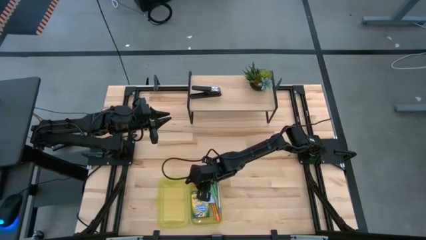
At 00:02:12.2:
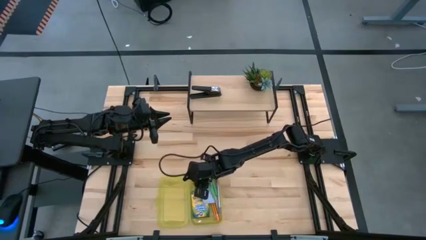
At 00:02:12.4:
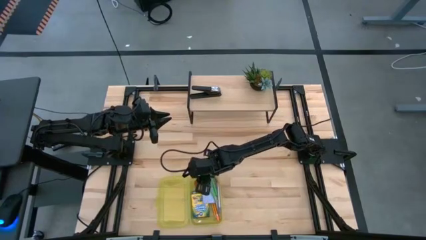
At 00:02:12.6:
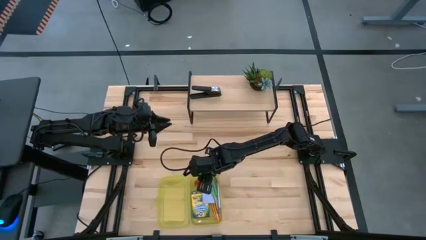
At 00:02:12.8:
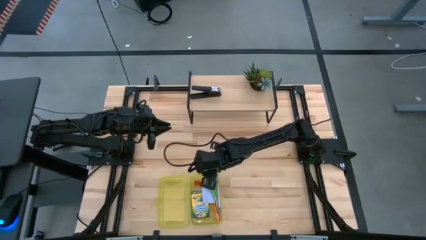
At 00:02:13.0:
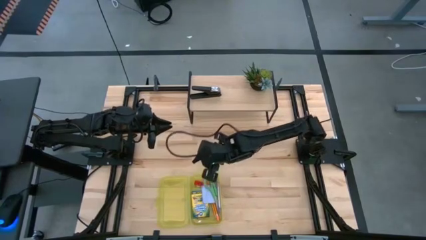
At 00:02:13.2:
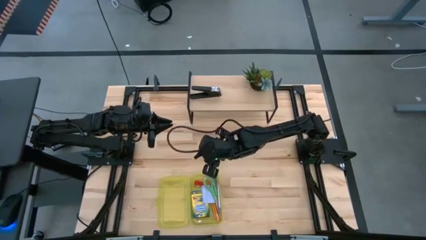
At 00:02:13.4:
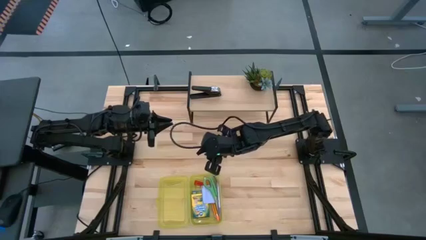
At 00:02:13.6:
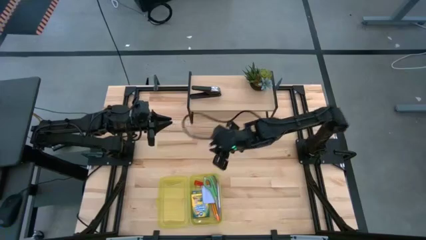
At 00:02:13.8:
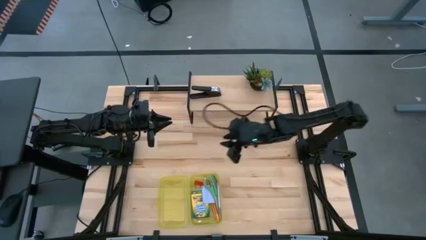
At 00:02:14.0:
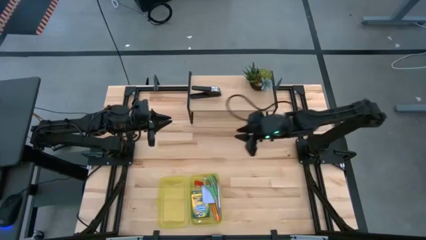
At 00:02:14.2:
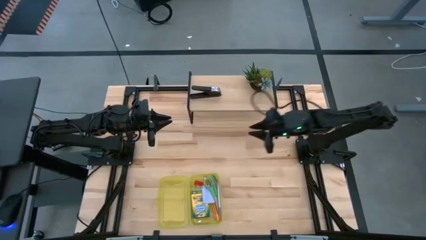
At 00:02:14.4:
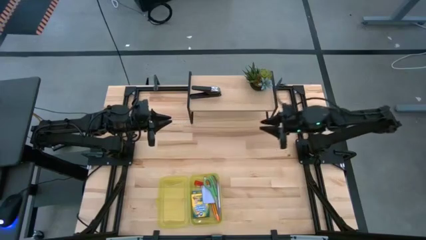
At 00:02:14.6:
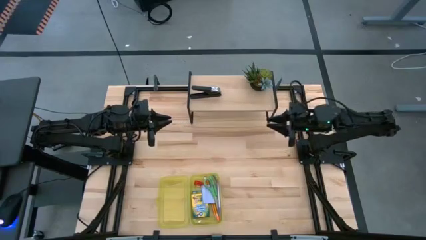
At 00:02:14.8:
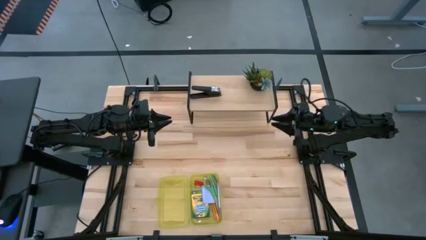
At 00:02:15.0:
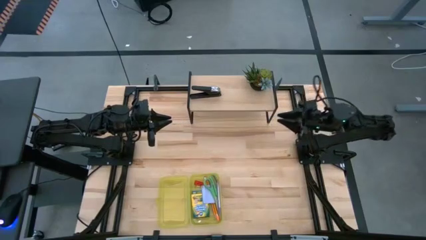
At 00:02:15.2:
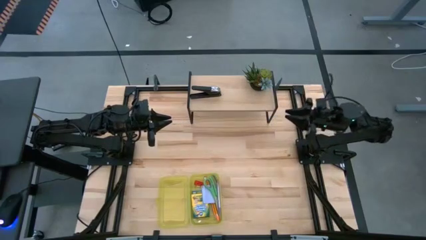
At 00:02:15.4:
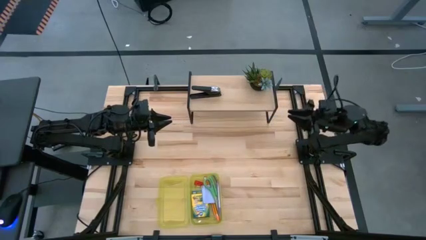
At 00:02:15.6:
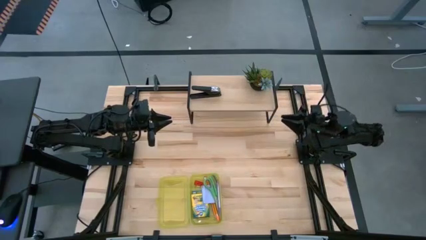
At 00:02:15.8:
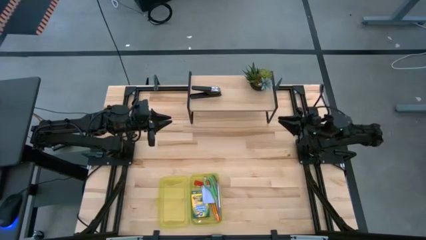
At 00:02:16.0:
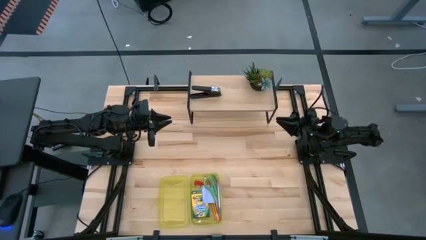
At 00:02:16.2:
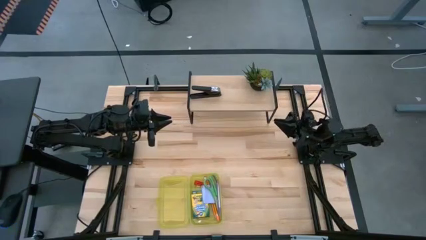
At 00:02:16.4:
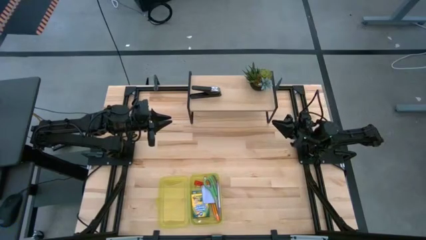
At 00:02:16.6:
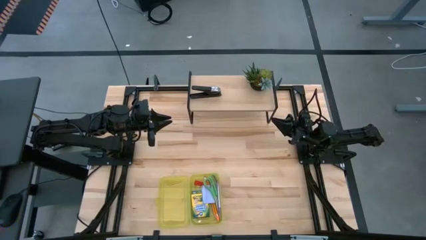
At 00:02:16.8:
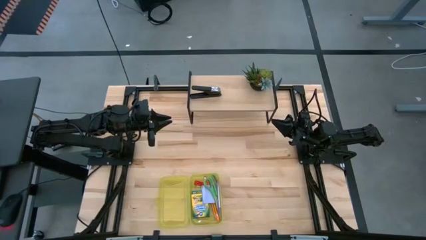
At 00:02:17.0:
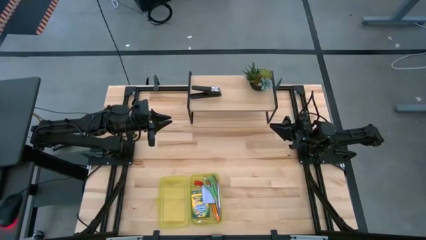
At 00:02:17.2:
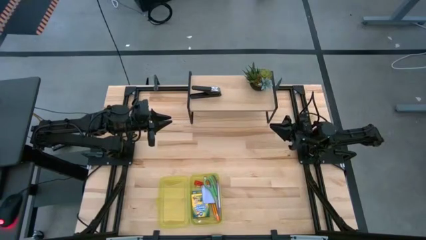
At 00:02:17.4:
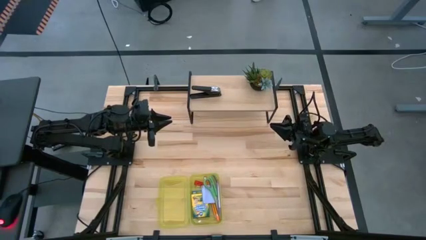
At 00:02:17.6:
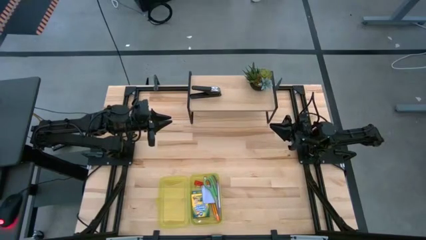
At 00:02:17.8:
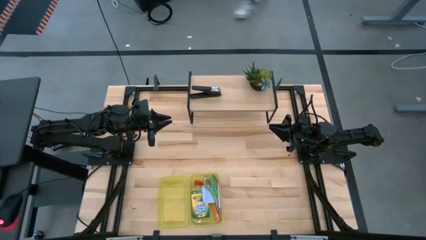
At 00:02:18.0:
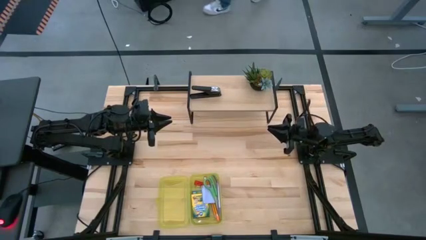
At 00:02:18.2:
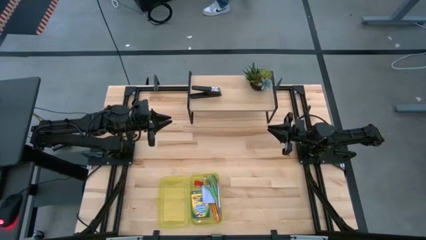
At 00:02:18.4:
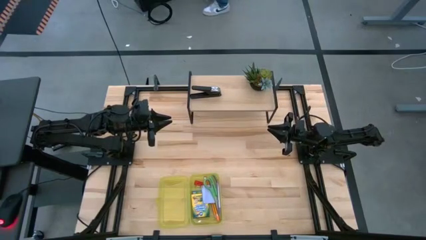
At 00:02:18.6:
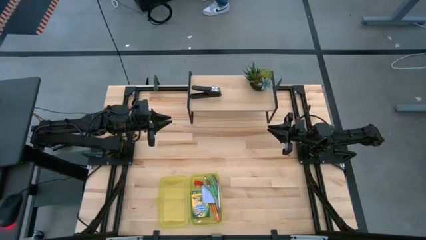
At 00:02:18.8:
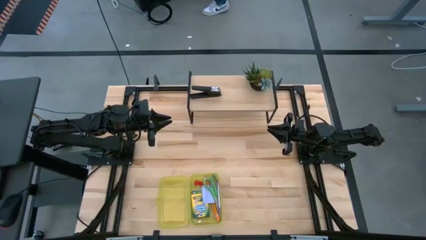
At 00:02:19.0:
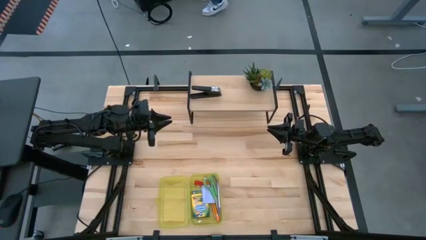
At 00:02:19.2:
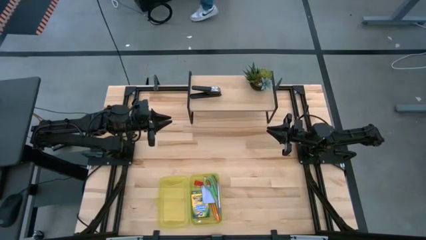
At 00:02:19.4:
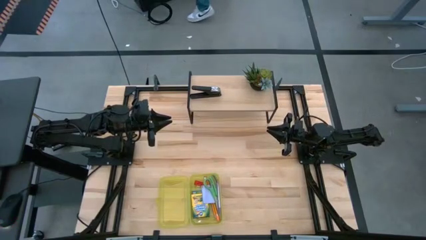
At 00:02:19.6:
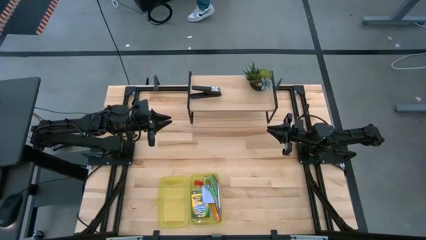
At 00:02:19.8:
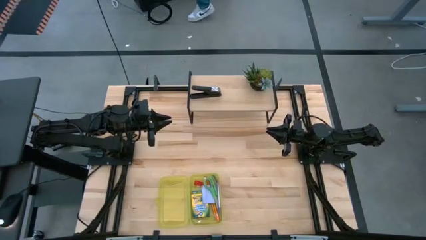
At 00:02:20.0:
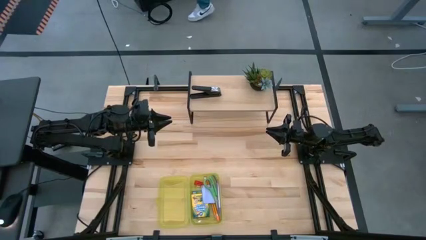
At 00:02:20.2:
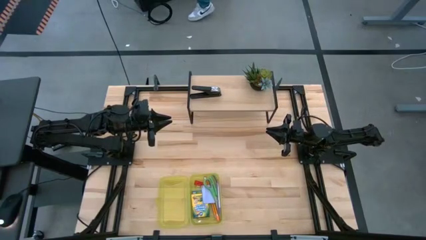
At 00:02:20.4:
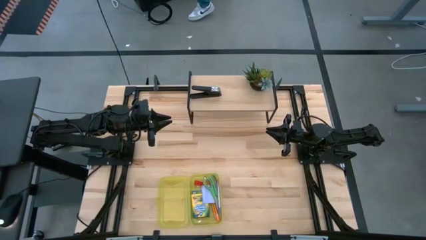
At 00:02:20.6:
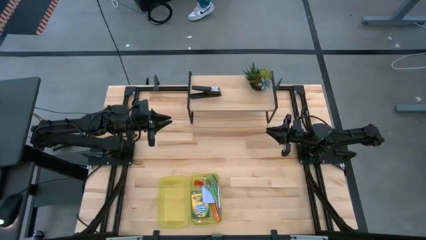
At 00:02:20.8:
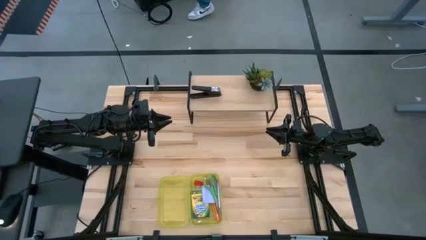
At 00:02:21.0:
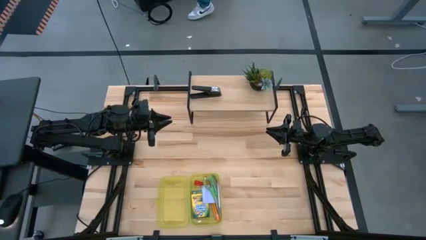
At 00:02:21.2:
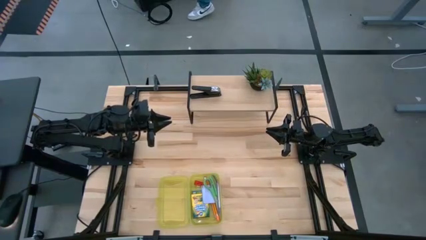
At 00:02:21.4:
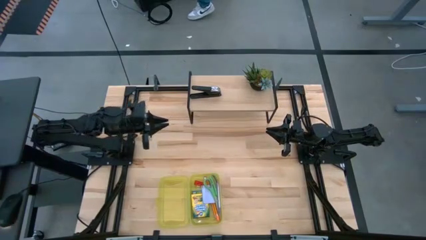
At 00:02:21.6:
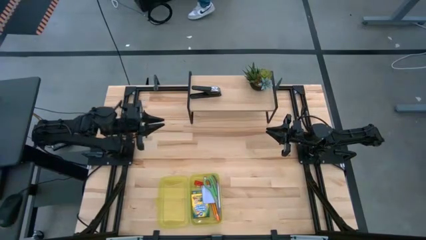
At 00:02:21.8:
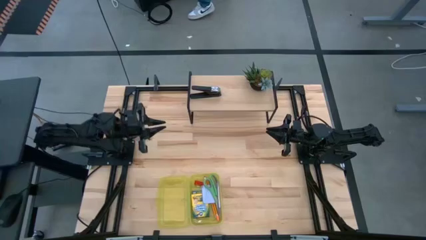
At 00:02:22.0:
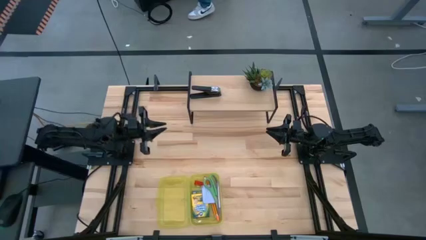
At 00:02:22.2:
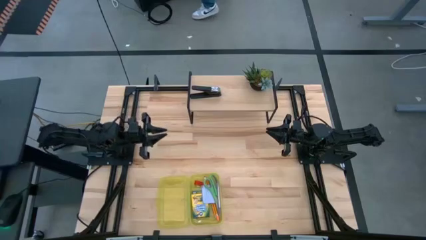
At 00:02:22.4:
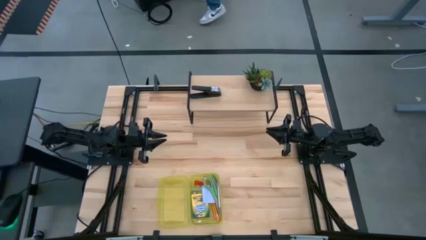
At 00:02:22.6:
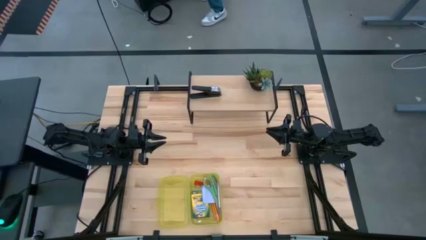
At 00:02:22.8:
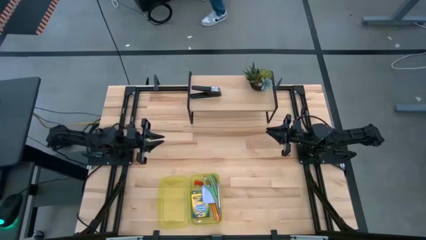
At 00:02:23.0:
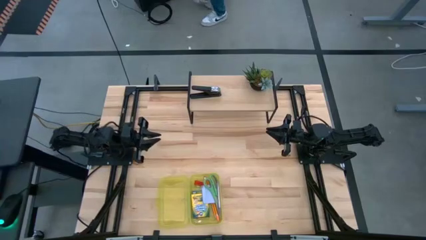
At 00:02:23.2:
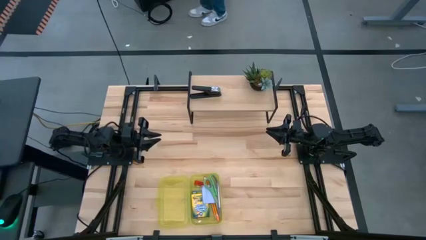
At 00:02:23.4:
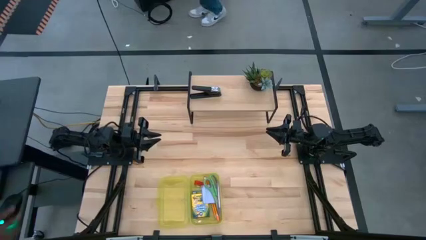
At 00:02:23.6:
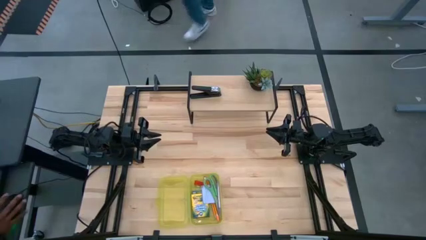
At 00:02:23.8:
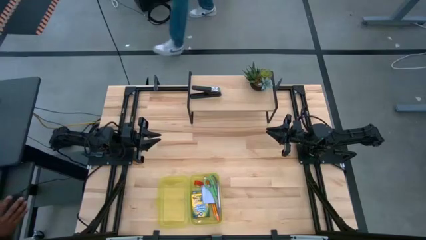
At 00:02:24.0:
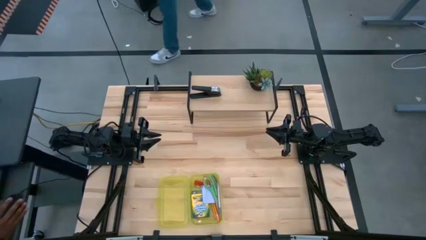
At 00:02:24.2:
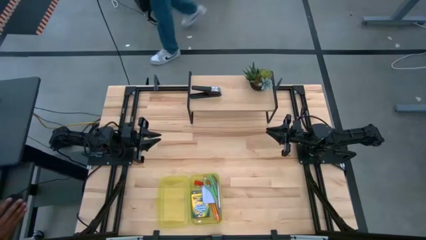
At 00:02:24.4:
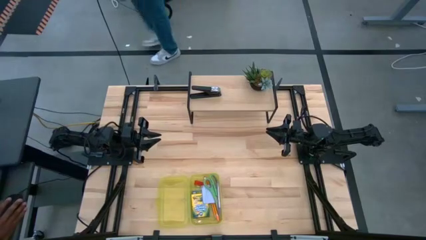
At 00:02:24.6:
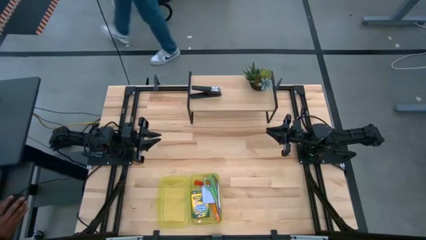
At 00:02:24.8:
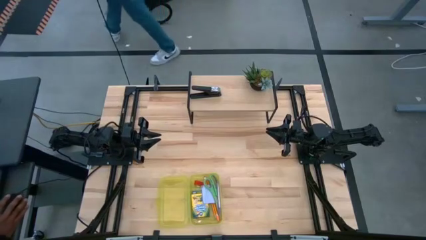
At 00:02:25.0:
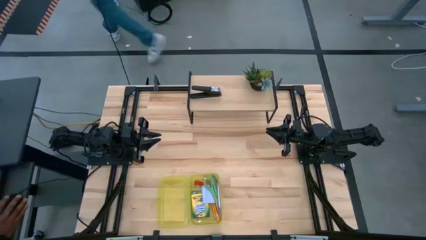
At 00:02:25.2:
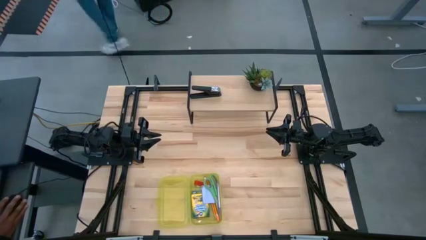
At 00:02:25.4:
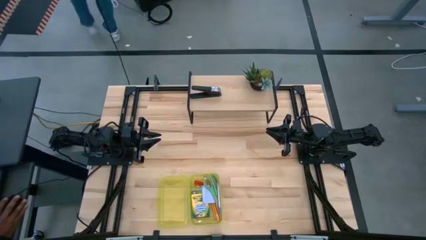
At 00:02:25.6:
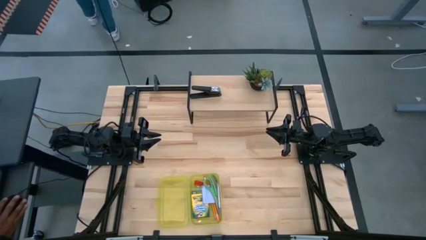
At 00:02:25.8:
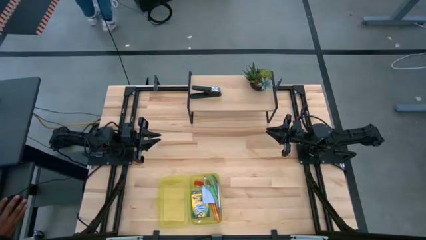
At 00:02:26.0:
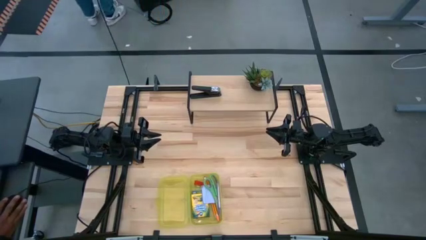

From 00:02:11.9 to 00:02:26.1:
Task: Pack school essentials
Return to Home Position
